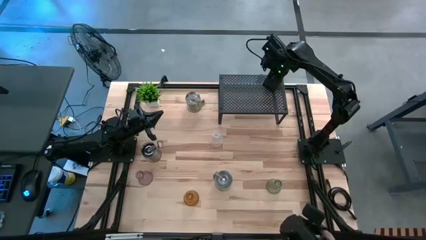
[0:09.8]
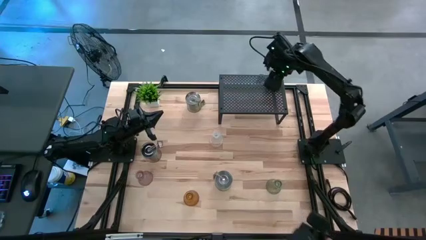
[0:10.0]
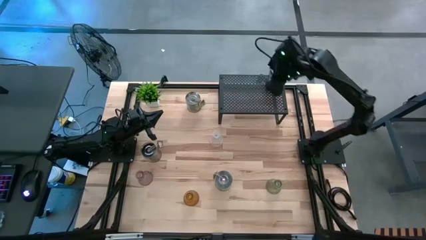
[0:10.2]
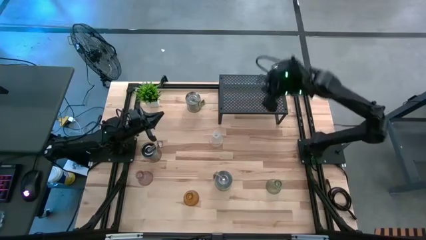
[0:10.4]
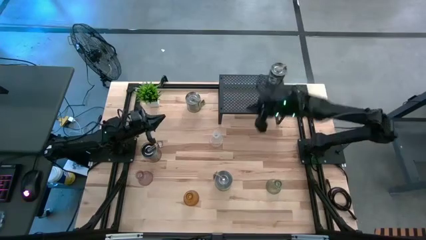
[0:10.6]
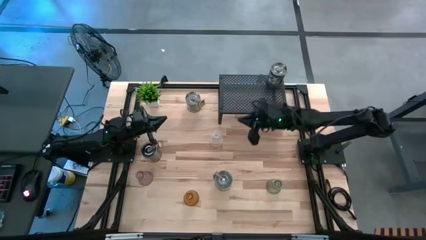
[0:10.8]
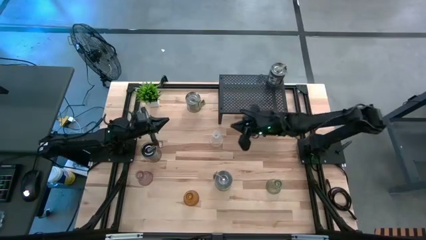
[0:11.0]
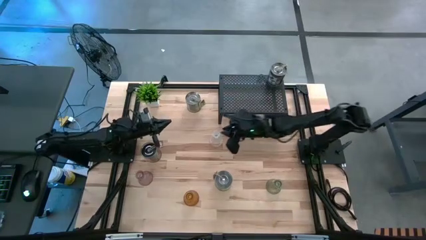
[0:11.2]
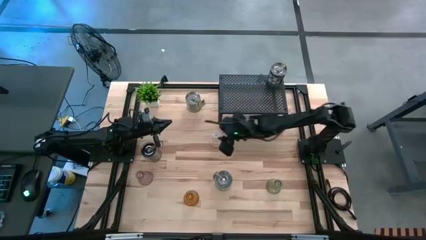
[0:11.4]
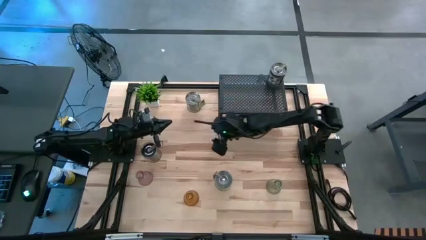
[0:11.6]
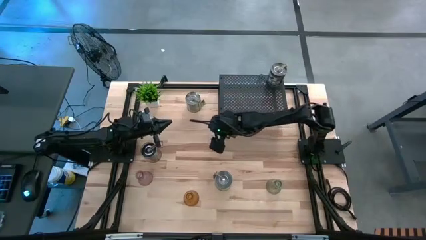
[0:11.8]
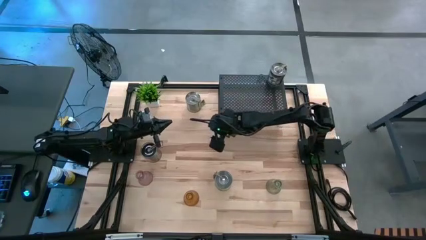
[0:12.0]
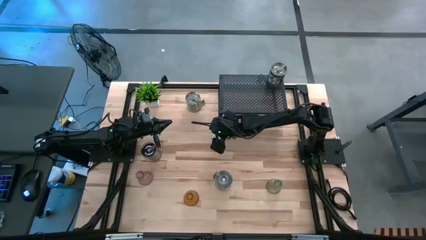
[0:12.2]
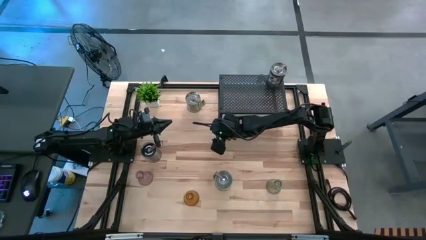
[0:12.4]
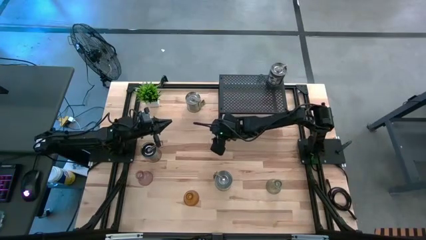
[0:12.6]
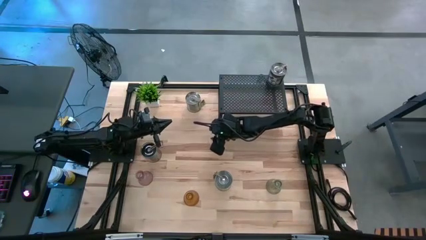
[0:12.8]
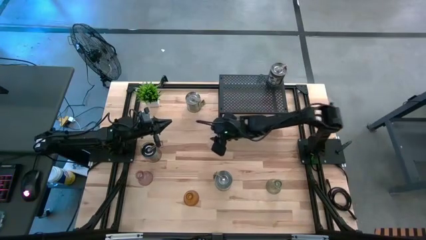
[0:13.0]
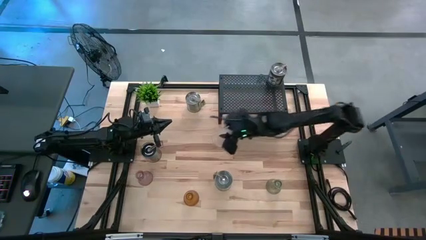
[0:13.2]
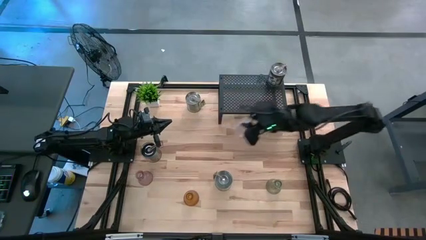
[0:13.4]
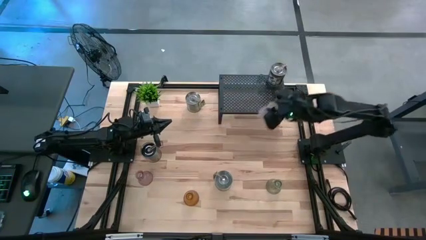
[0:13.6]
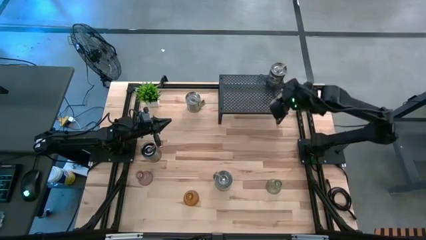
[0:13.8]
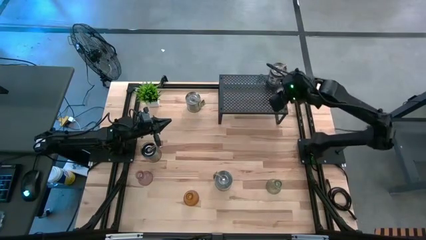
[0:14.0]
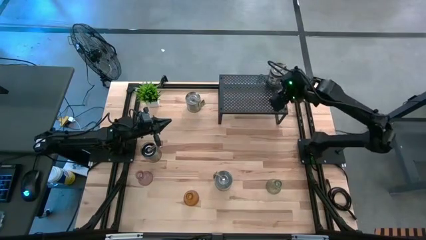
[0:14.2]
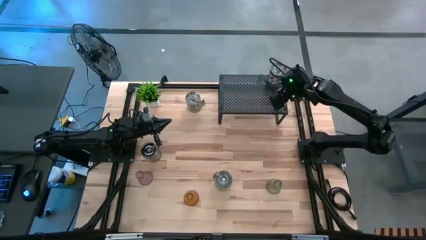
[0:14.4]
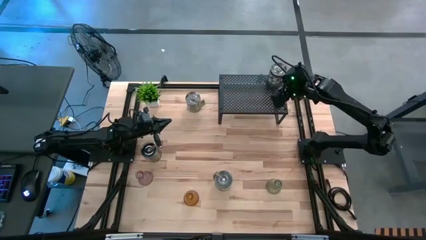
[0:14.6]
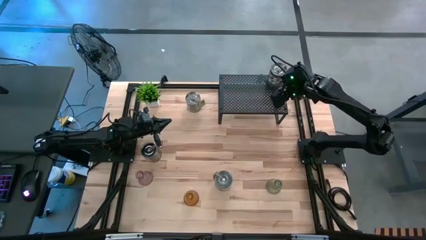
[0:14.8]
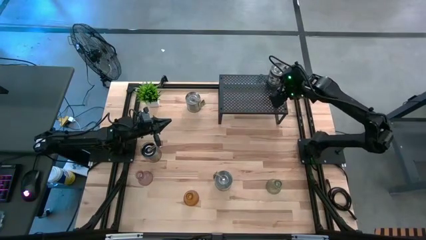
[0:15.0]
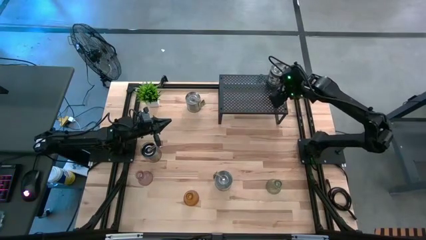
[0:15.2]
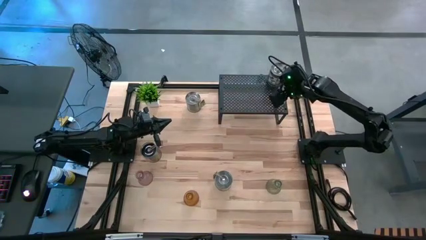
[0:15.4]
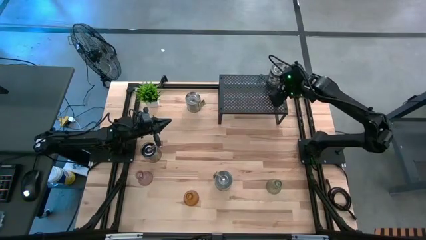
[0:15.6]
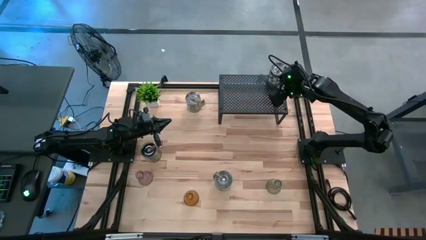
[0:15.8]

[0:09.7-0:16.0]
Task: Pick & Place candle stick holders
Put the transparent candle holder on the shelf

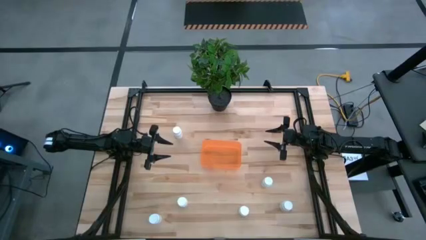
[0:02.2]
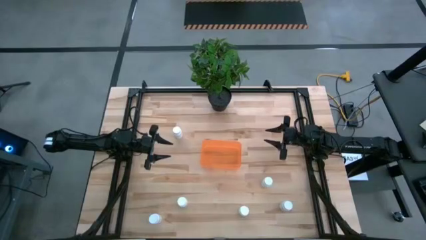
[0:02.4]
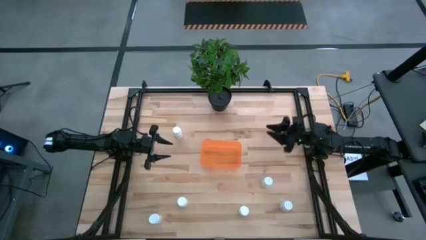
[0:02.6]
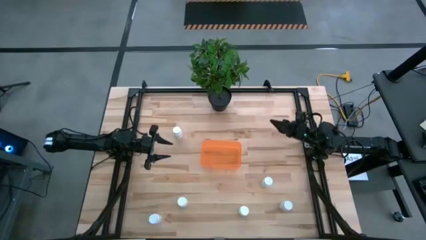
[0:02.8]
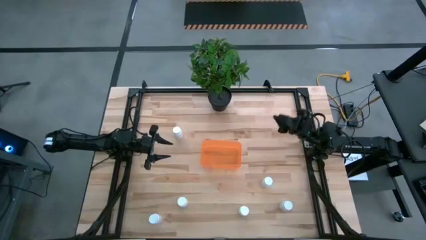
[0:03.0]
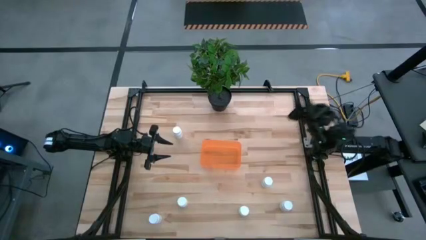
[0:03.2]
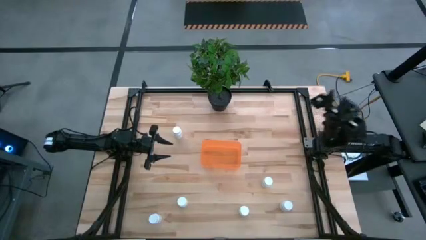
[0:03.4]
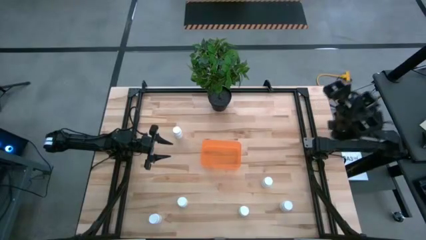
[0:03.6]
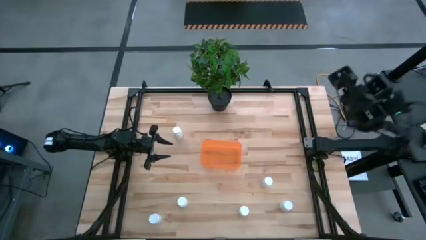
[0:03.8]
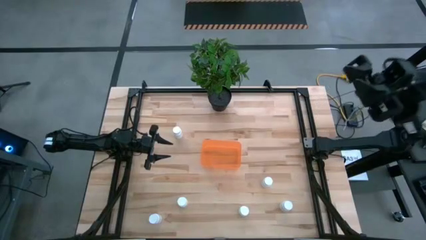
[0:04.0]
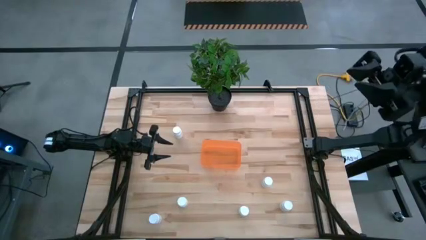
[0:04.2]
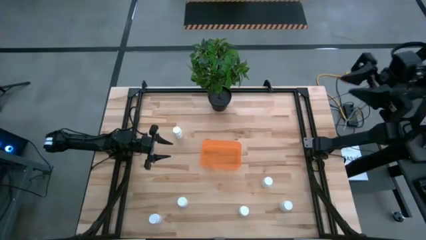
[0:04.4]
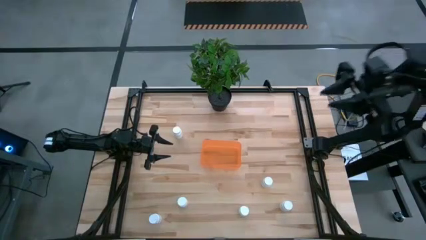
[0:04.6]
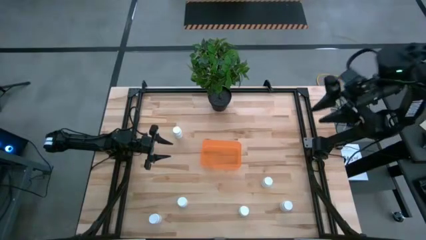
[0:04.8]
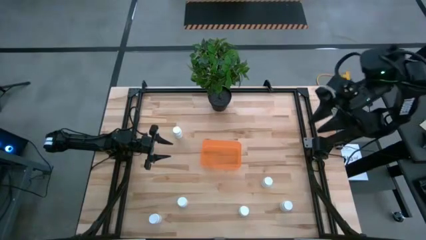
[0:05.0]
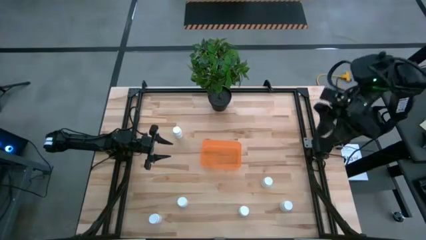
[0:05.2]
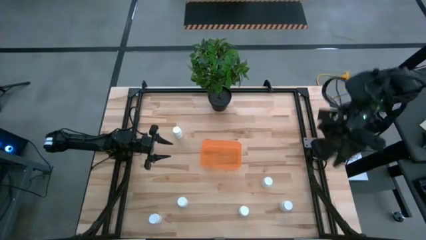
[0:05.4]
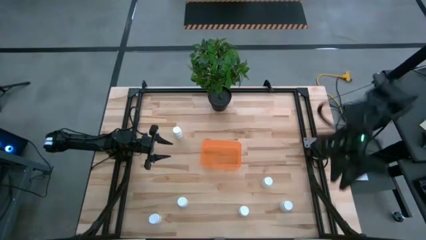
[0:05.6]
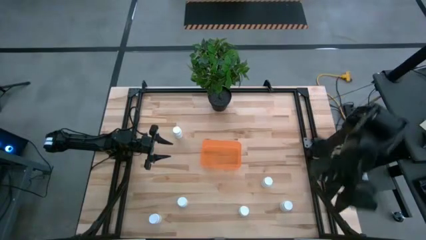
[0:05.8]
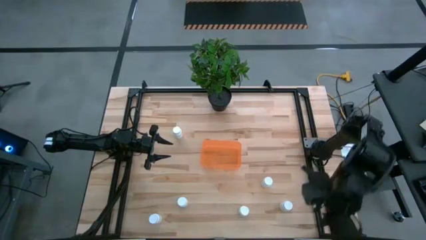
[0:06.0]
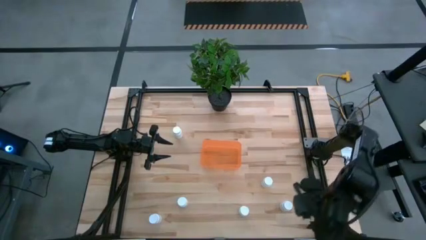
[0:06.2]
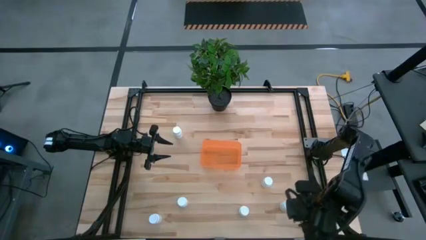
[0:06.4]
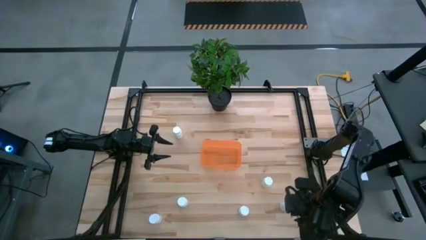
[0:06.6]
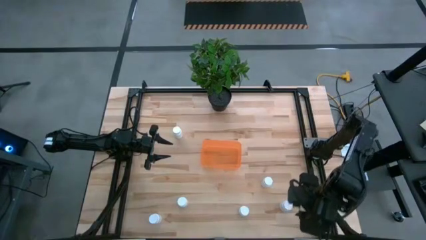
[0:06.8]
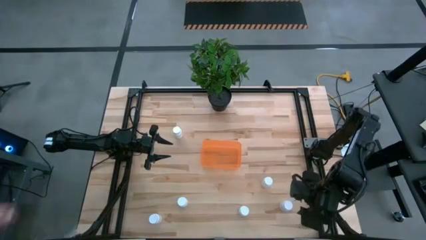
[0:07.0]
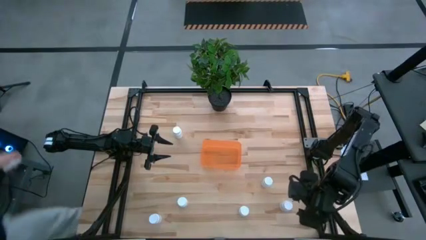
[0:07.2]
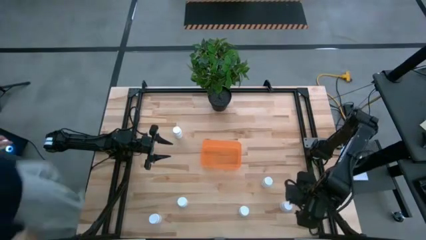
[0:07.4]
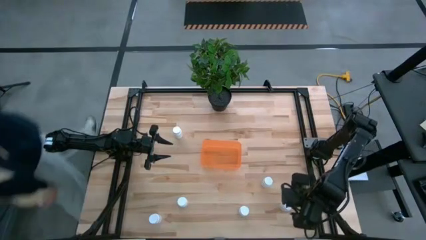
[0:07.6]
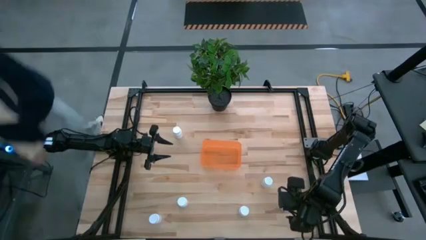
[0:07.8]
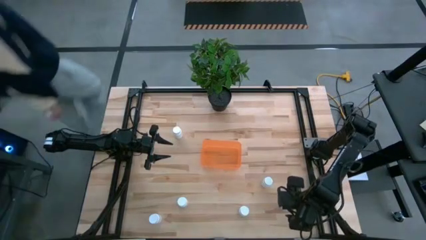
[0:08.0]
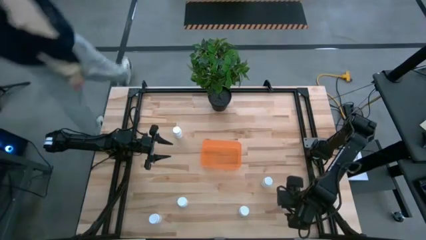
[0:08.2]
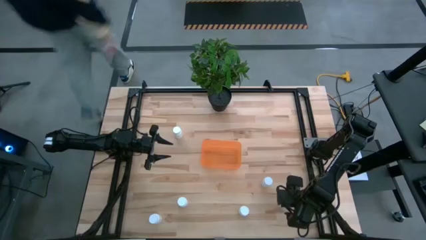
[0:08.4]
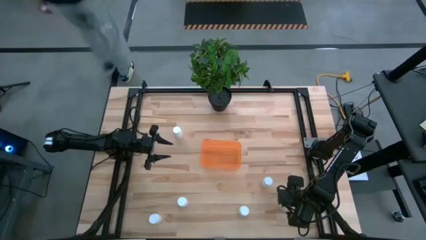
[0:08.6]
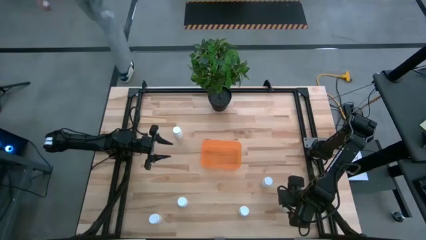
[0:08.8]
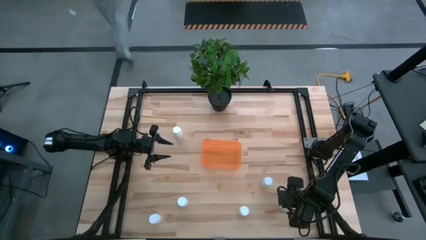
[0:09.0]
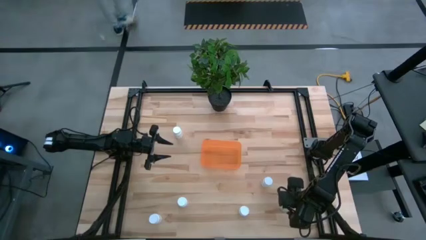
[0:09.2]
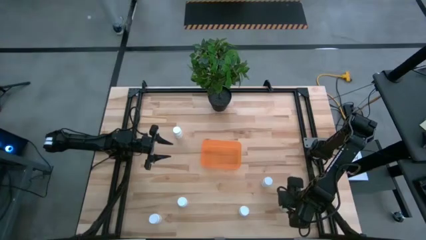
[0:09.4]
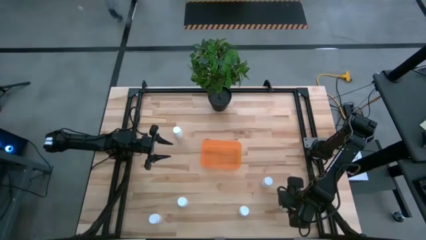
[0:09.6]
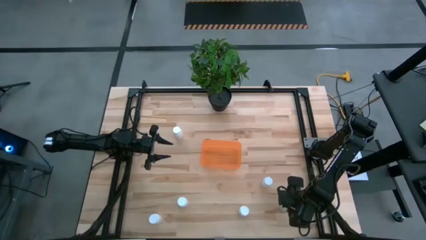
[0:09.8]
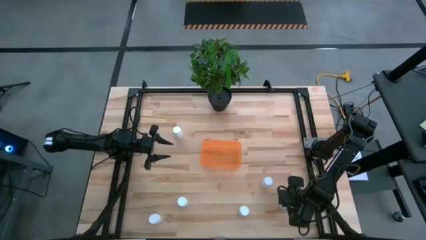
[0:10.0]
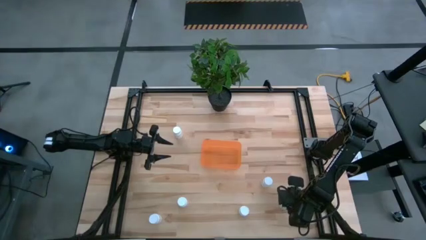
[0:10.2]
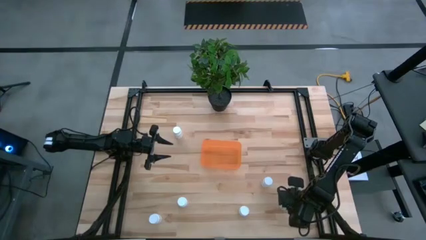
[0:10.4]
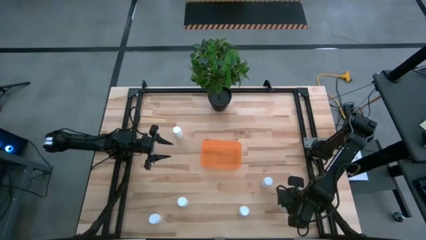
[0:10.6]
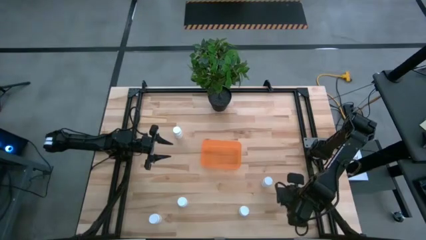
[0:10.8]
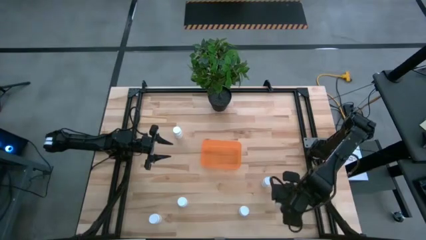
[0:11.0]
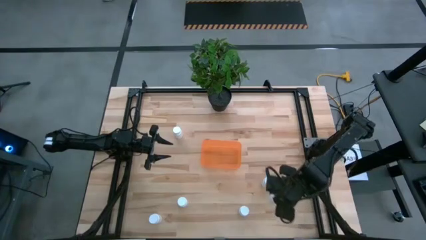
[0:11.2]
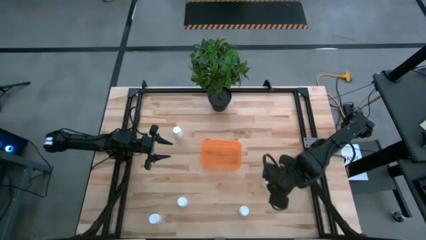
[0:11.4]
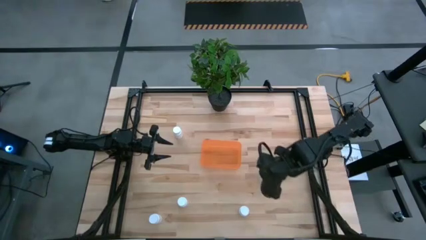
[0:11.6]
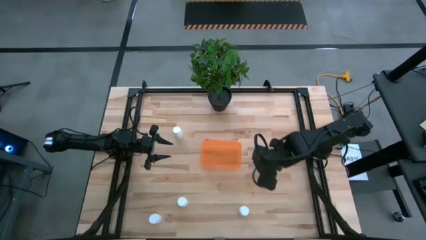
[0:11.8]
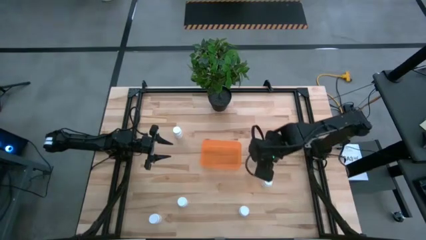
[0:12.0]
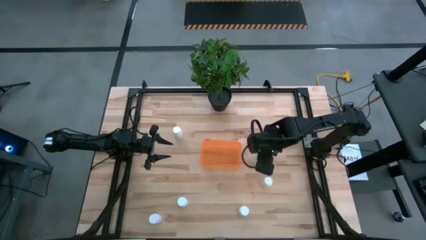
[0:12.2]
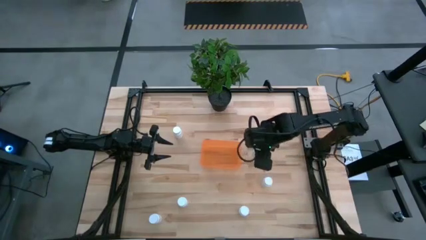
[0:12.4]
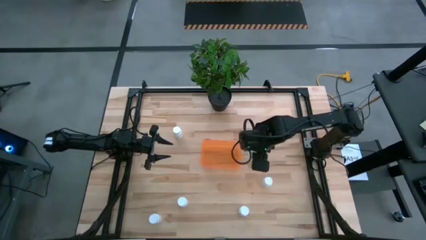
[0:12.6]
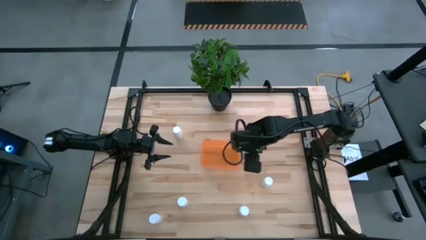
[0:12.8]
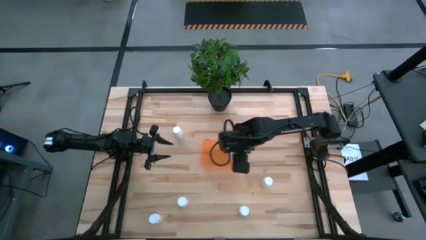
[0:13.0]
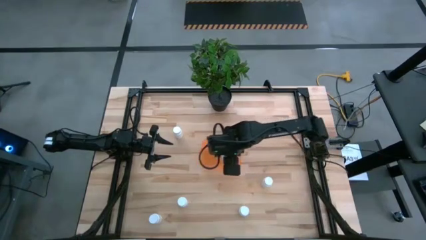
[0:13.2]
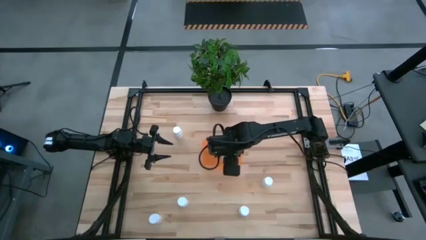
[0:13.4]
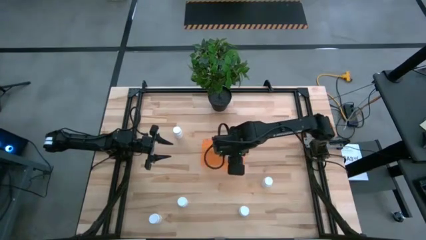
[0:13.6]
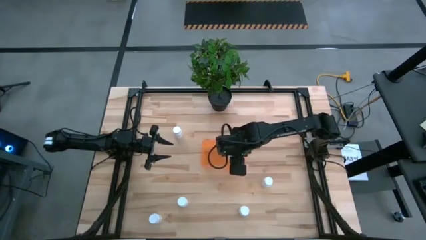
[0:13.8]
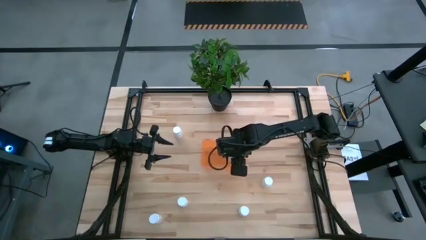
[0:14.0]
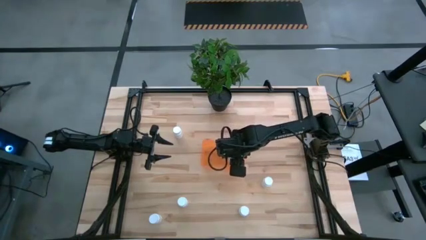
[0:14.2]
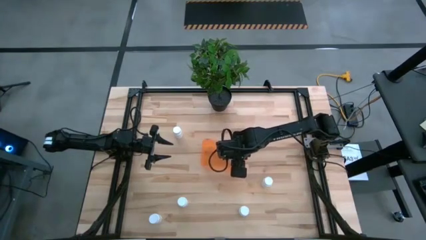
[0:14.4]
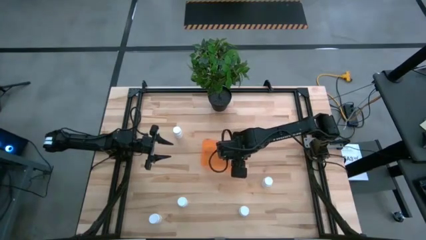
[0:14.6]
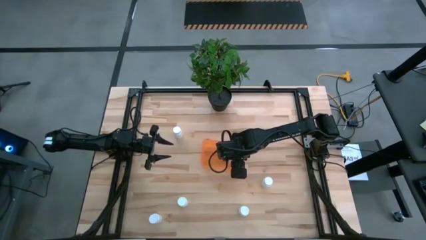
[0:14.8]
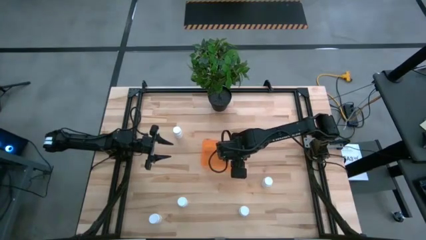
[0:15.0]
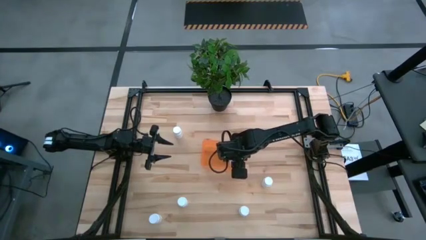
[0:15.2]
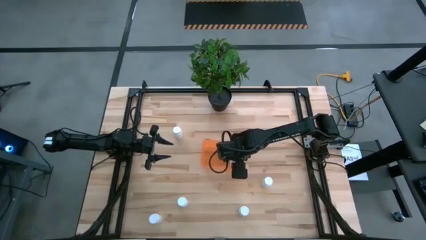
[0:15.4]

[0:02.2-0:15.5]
Task: Pick and place pill bottles into a basket
Put the white pill bottle into the orange bin
